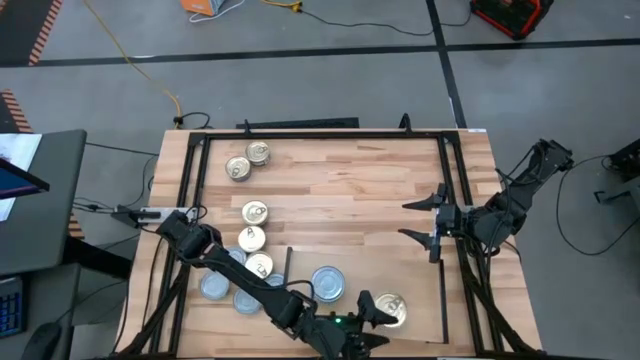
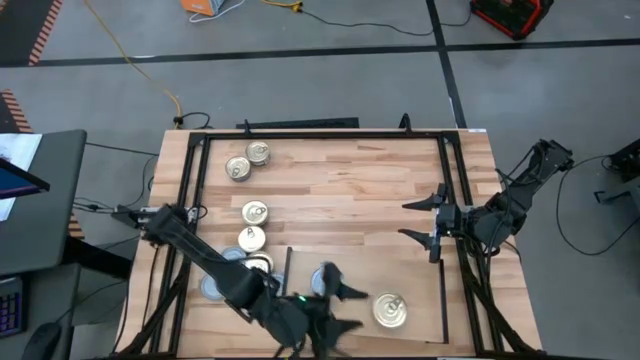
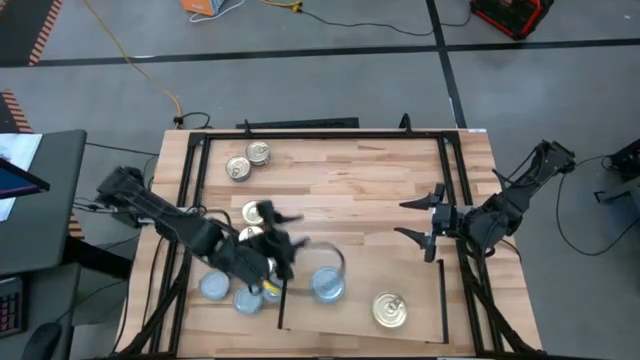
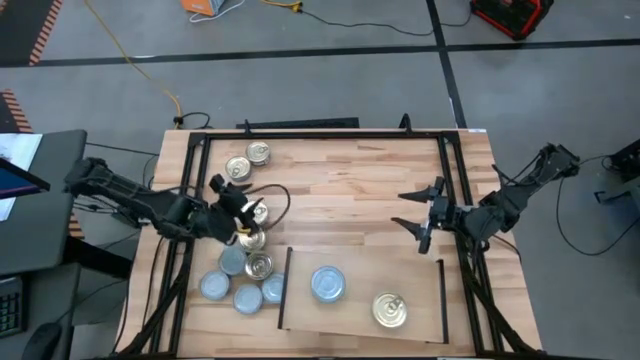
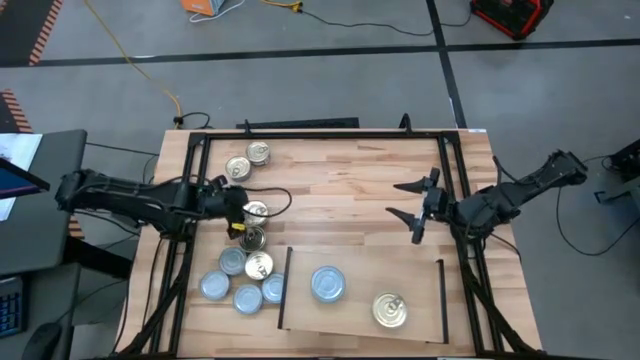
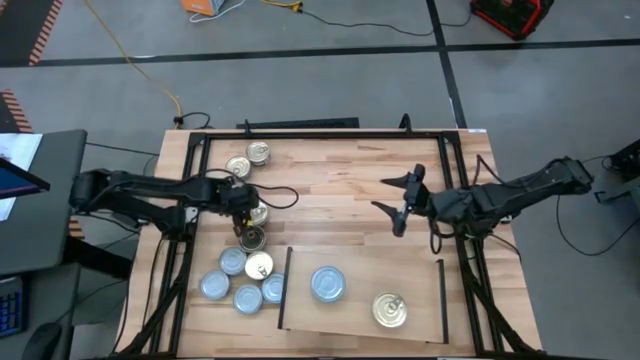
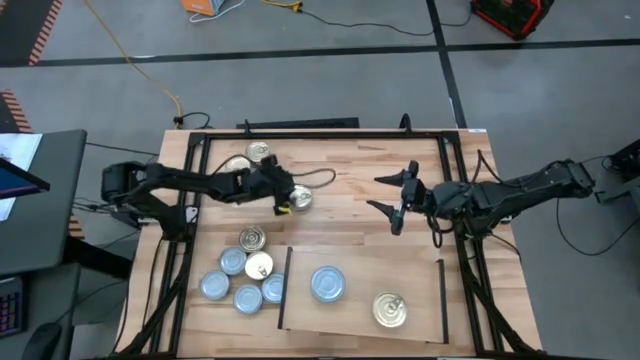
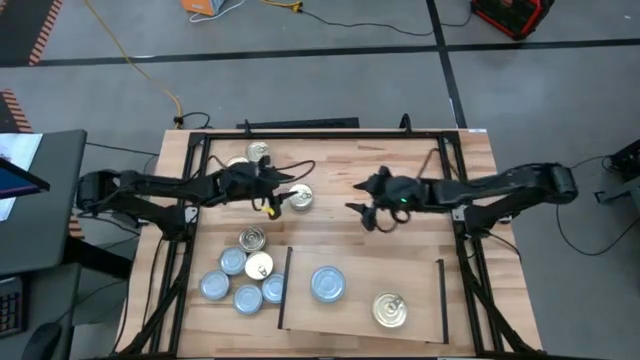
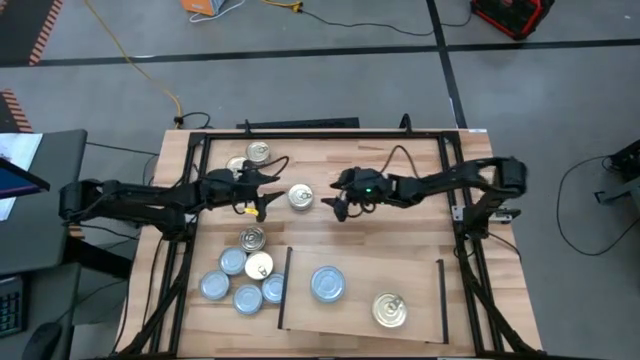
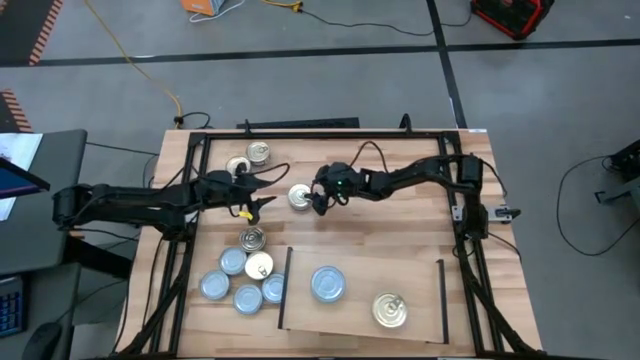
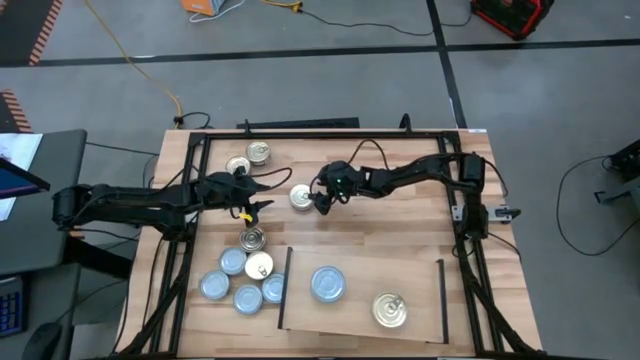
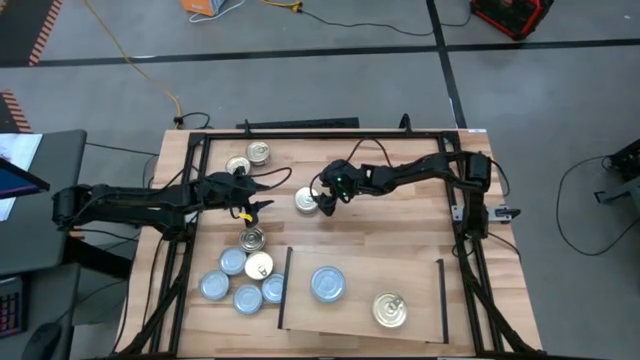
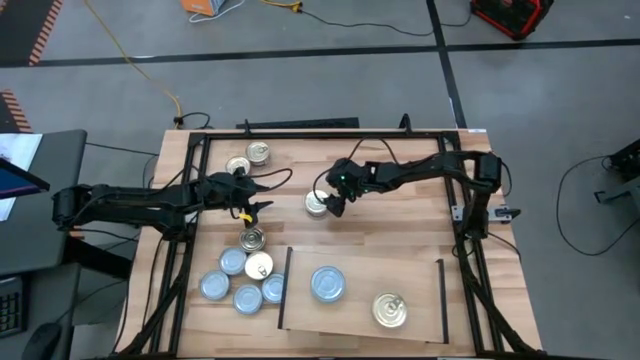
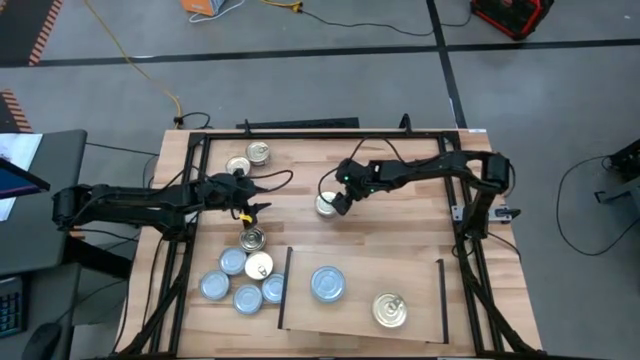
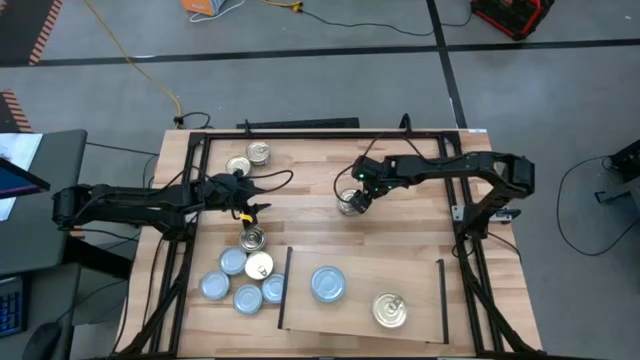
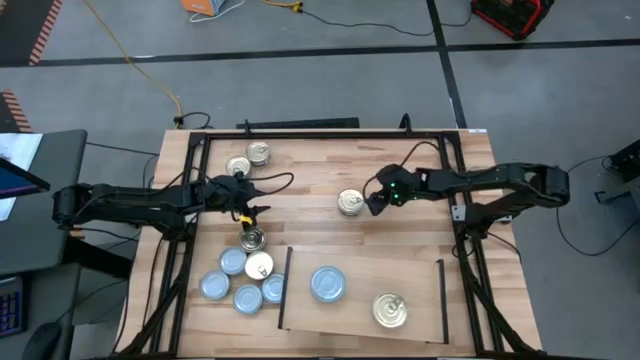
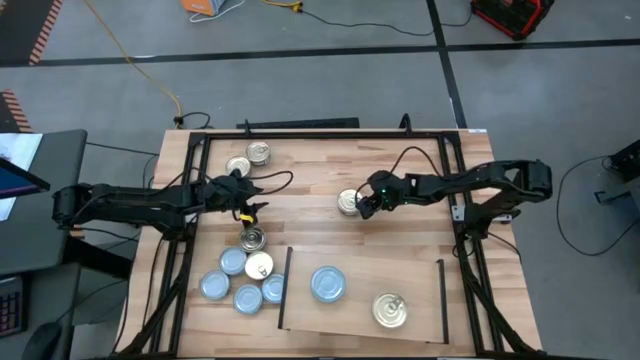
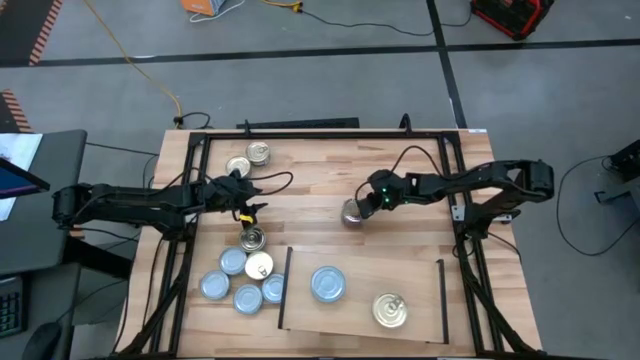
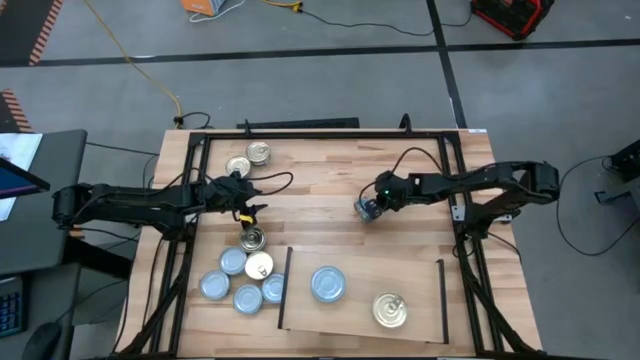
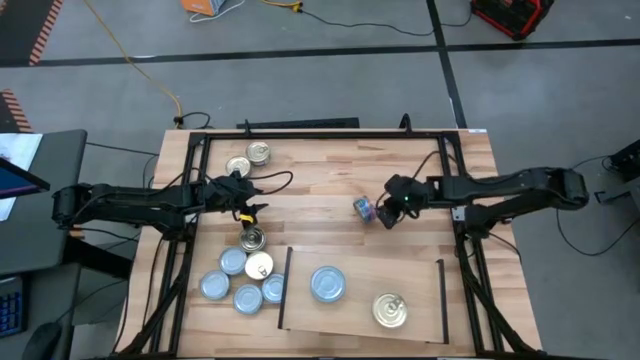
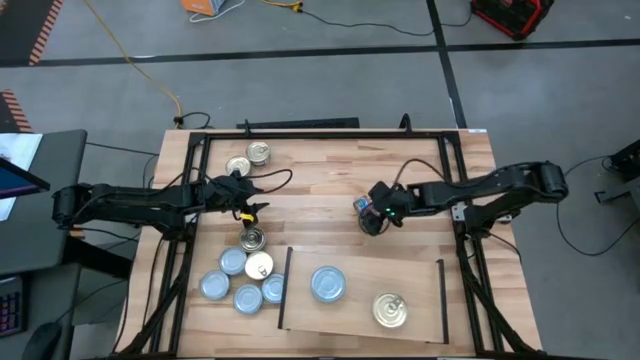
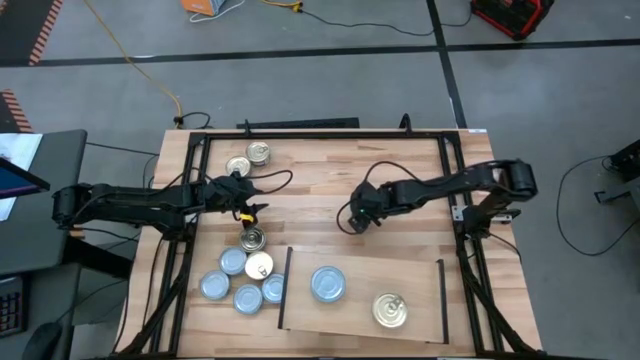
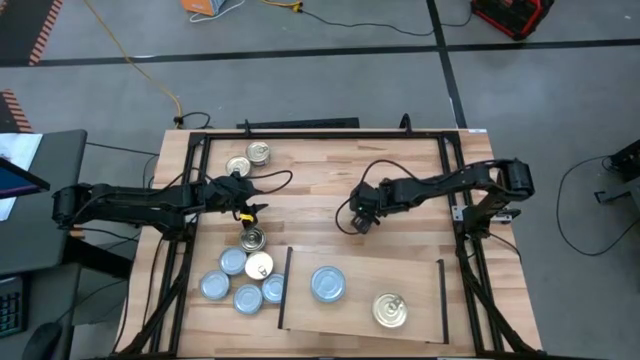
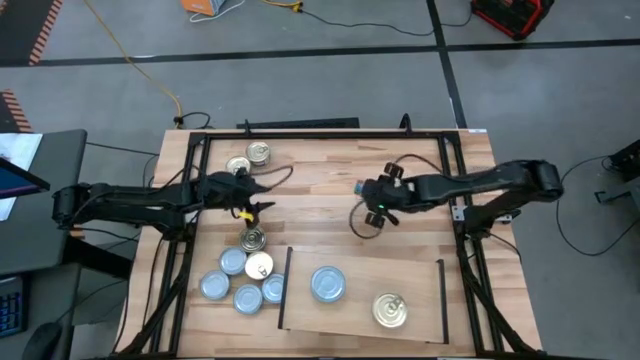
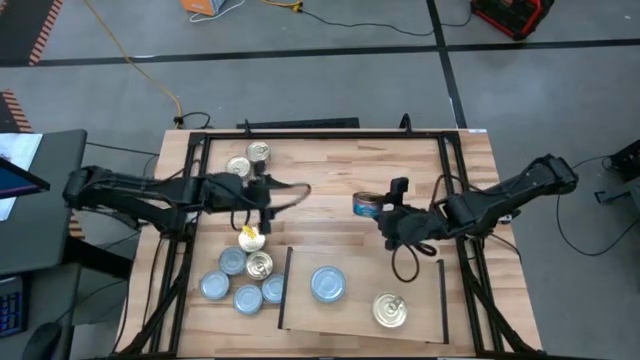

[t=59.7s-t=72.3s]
Task: Stack canned seafood by type on shelf
Stack the blue-pink tuna can on the top of the blue-pink tuna can on the shelf

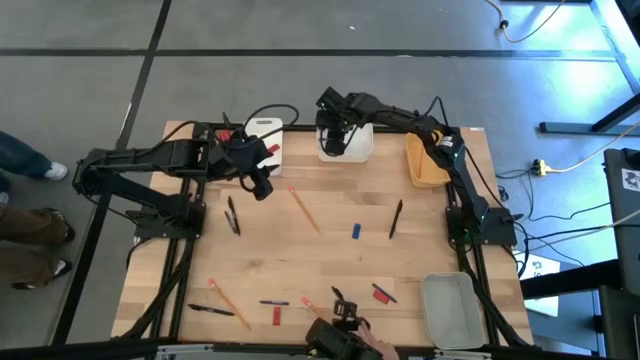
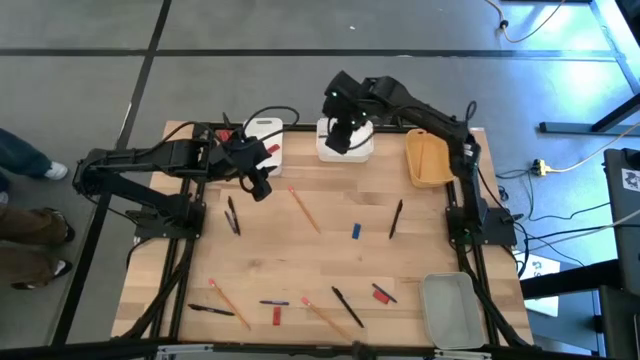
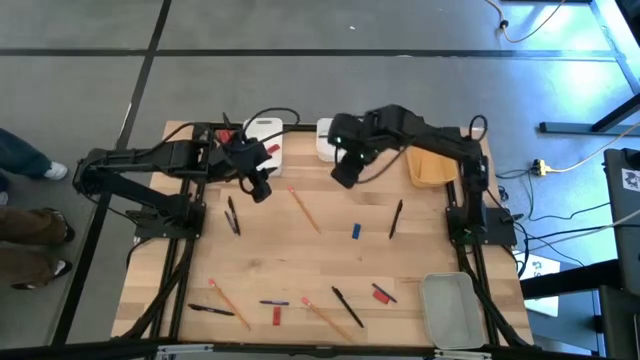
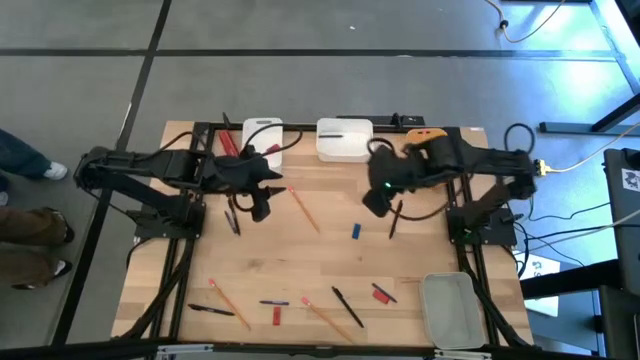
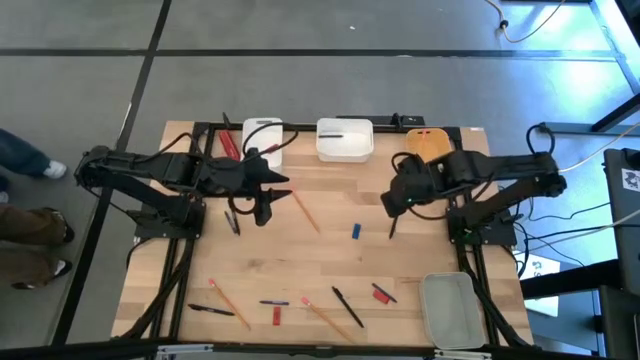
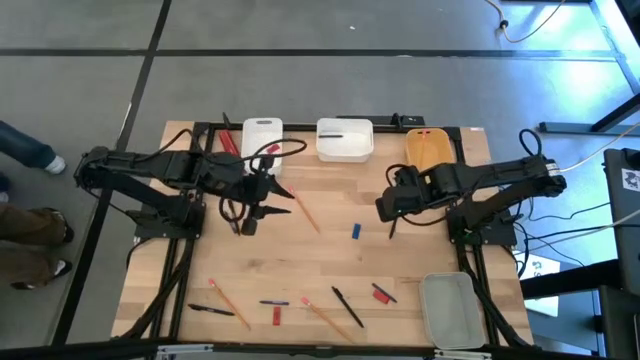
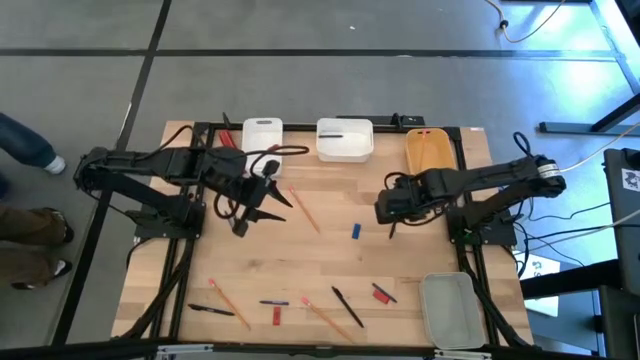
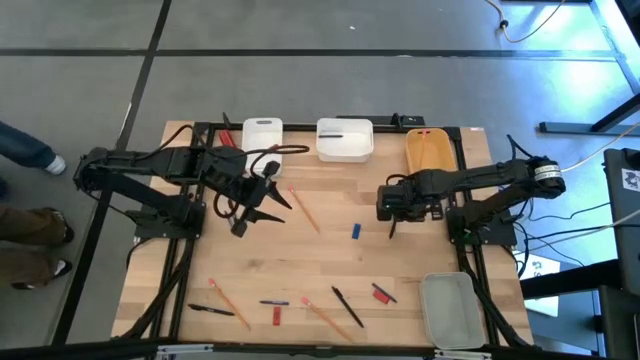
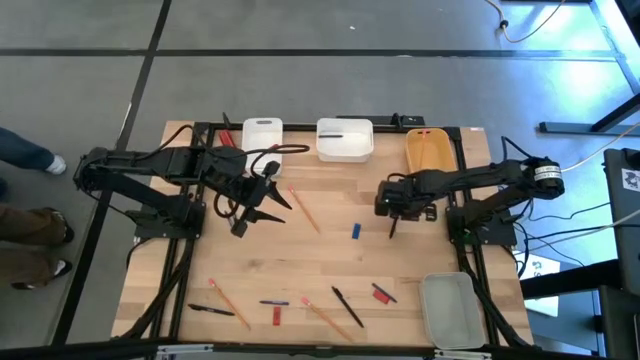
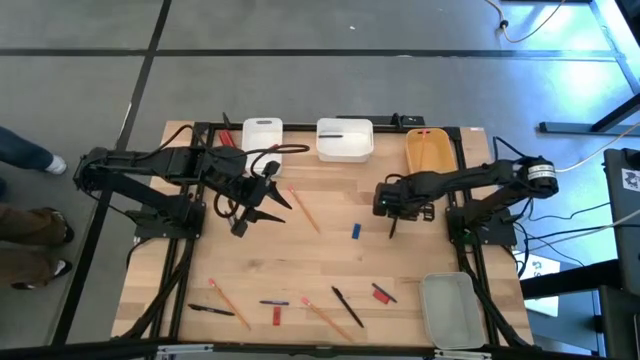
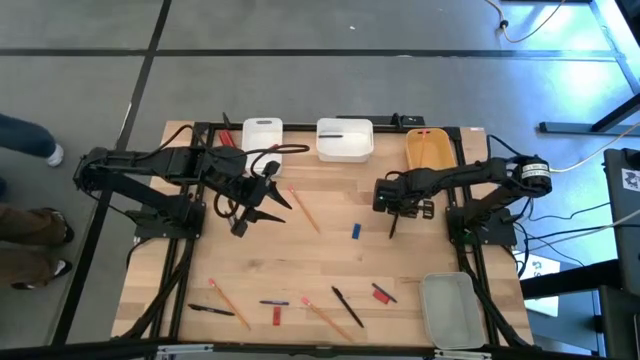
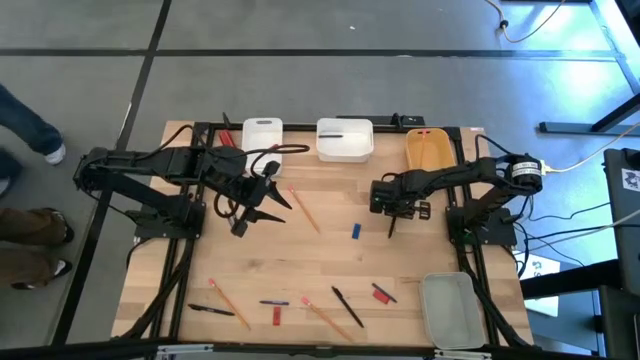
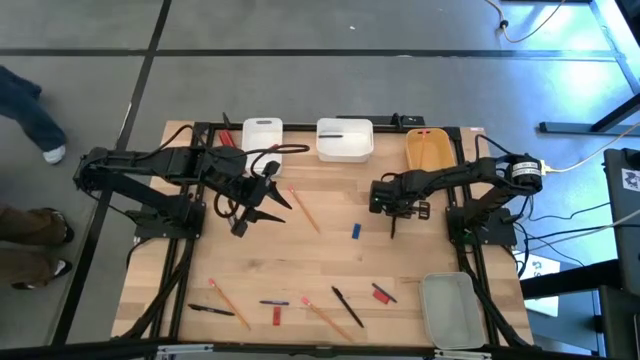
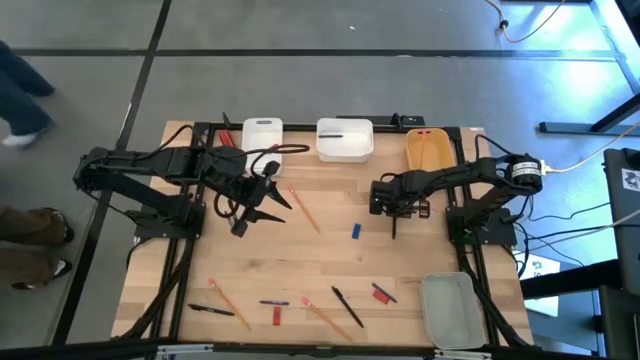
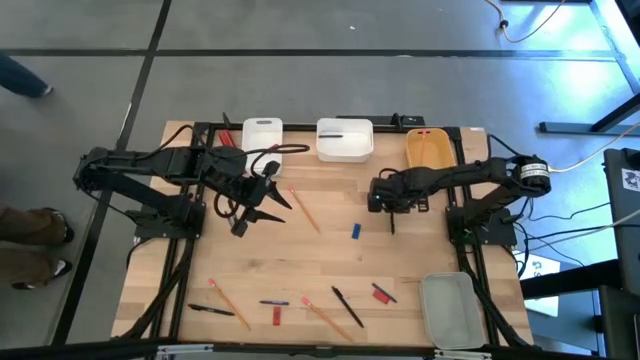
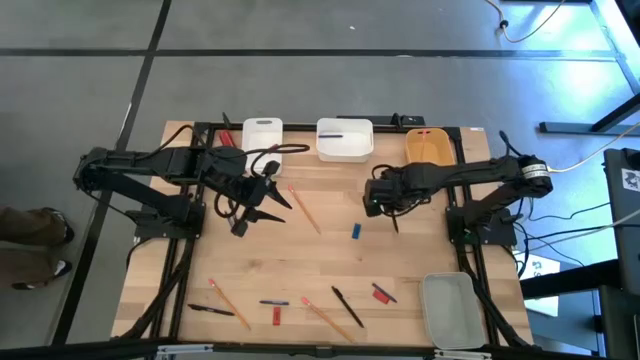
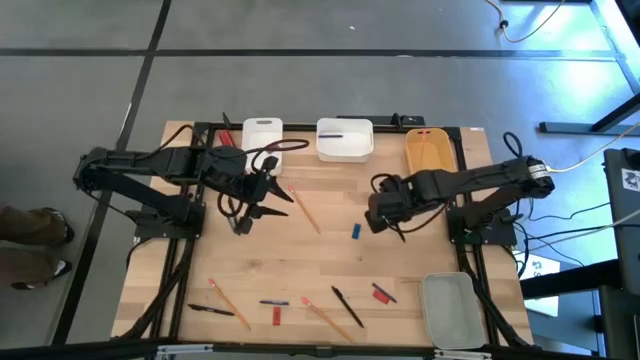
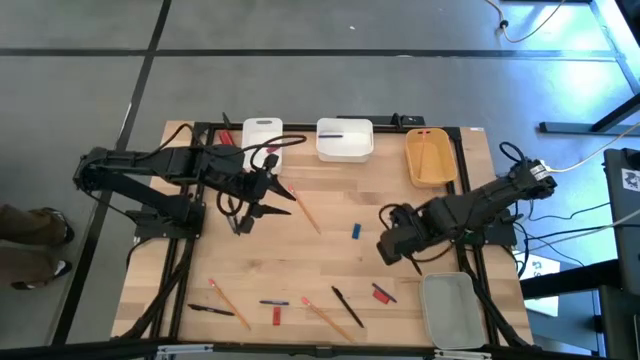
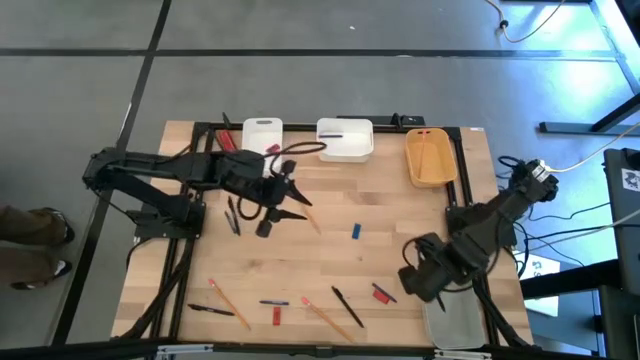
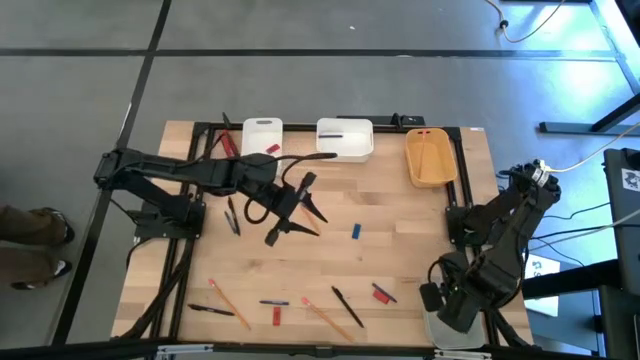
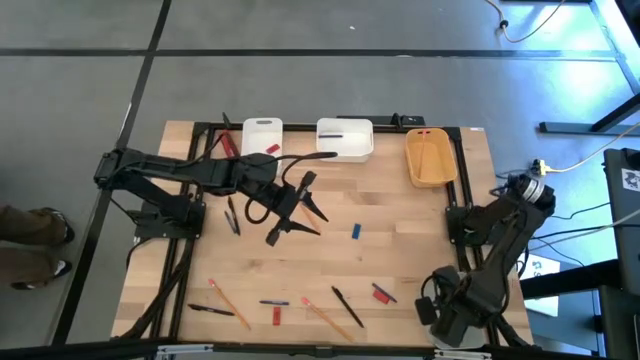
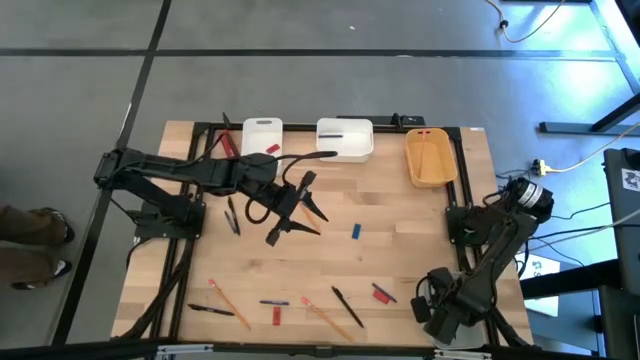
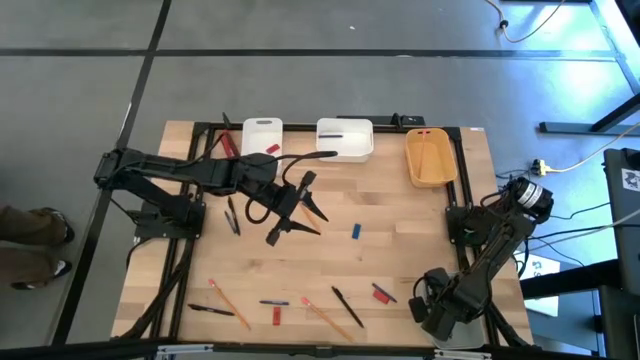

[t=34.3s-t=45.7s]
Task: Sort crayons/erasers/pens/pencils in bins
Put the black pen into the gray bin
